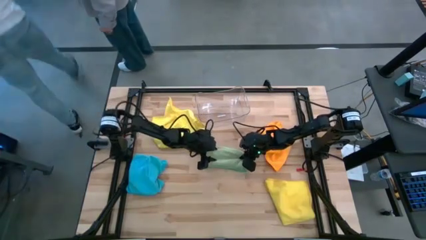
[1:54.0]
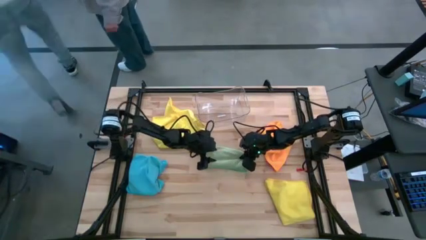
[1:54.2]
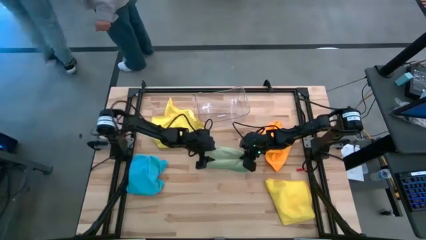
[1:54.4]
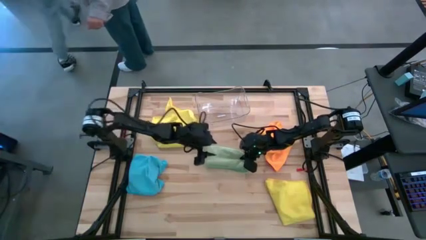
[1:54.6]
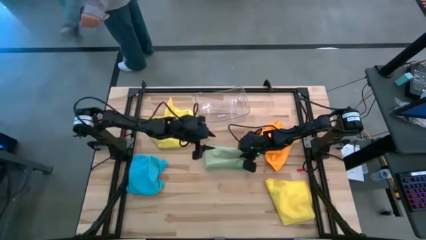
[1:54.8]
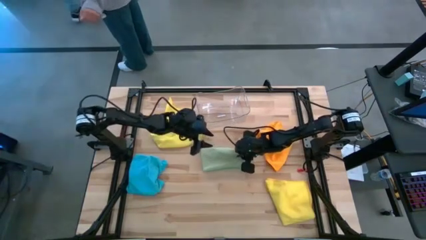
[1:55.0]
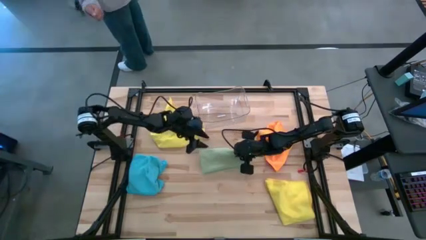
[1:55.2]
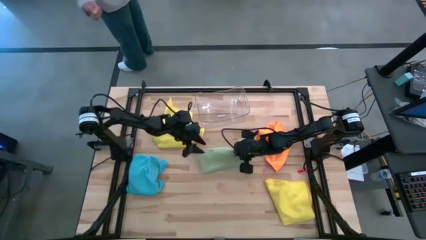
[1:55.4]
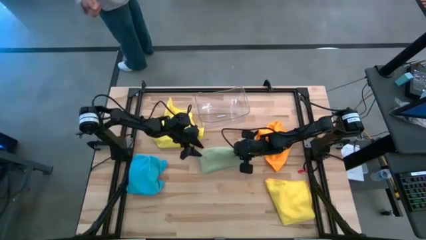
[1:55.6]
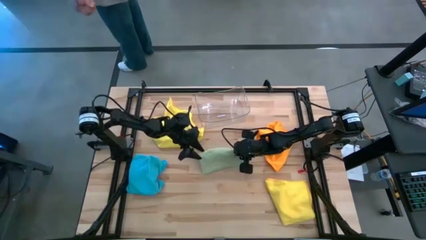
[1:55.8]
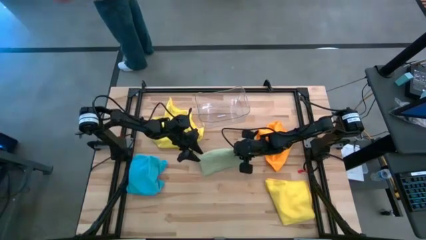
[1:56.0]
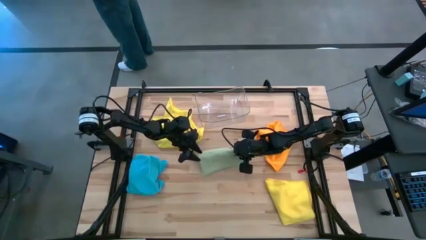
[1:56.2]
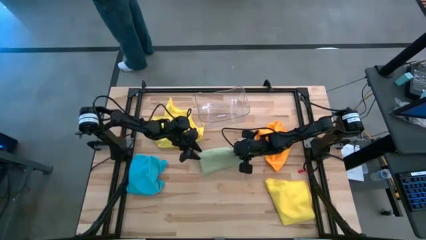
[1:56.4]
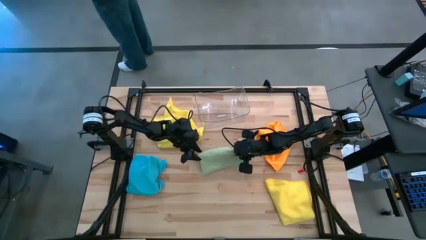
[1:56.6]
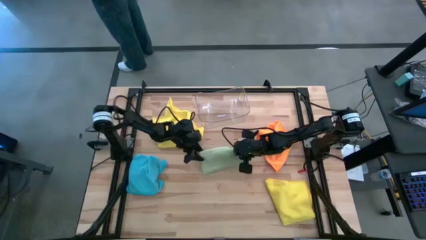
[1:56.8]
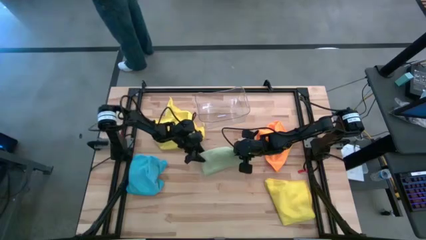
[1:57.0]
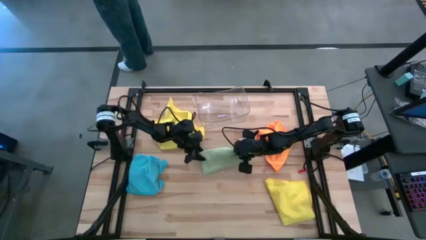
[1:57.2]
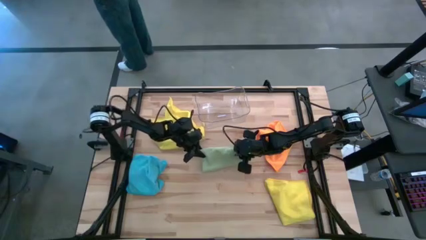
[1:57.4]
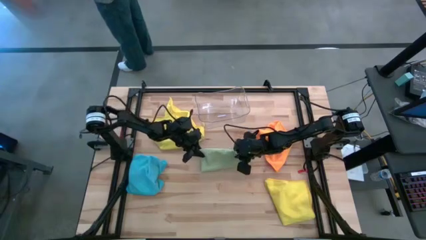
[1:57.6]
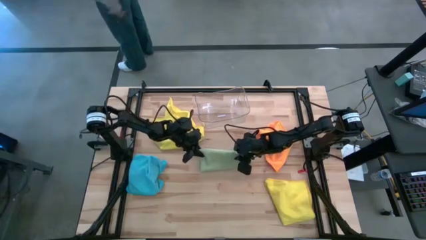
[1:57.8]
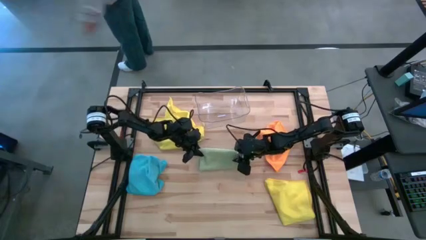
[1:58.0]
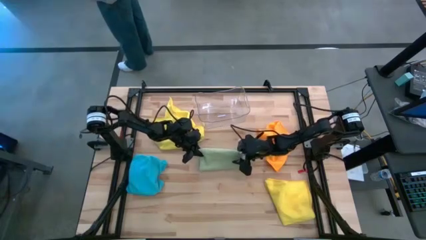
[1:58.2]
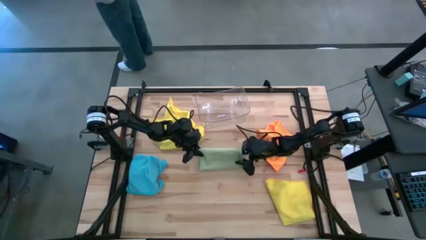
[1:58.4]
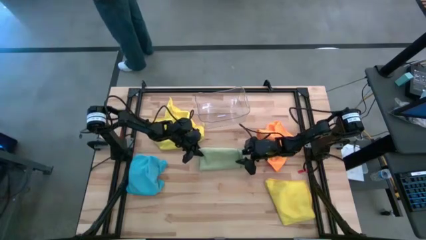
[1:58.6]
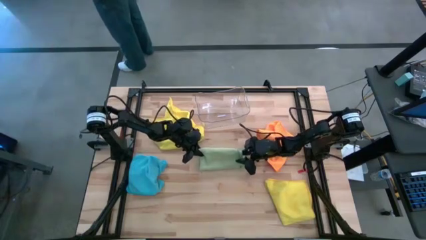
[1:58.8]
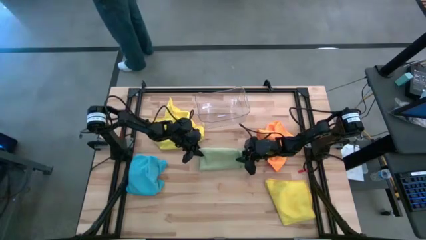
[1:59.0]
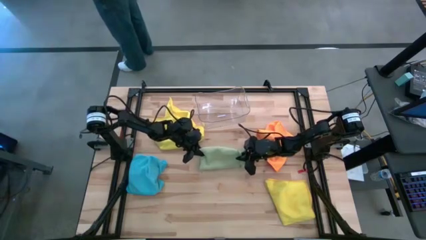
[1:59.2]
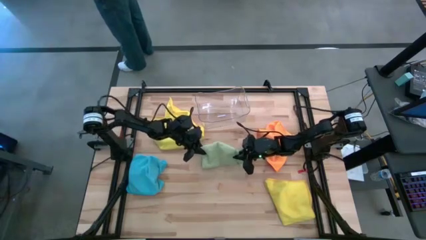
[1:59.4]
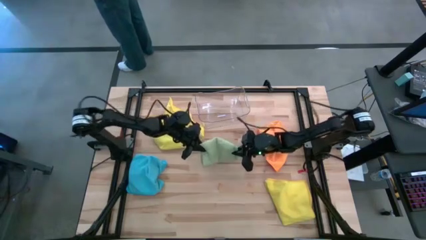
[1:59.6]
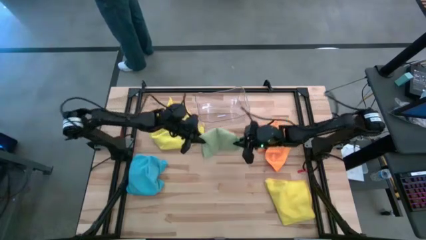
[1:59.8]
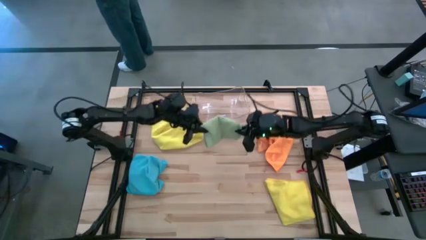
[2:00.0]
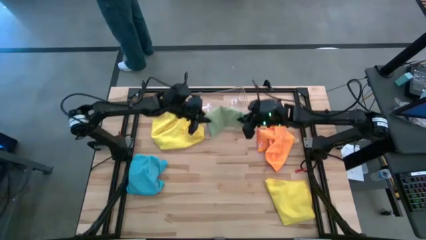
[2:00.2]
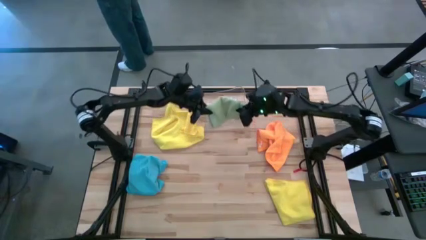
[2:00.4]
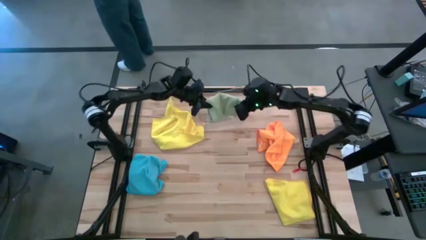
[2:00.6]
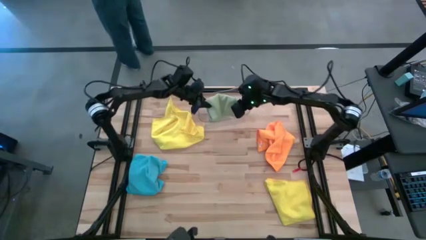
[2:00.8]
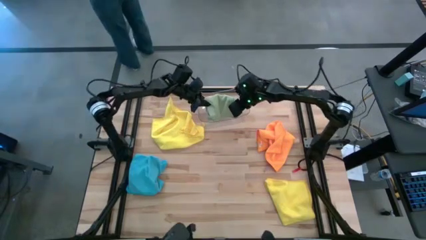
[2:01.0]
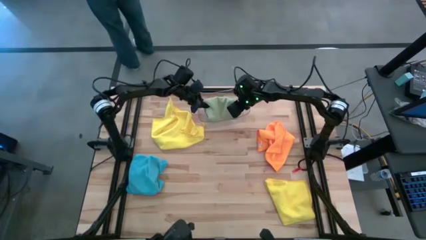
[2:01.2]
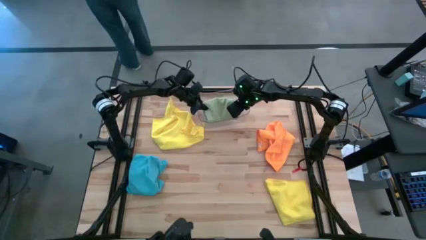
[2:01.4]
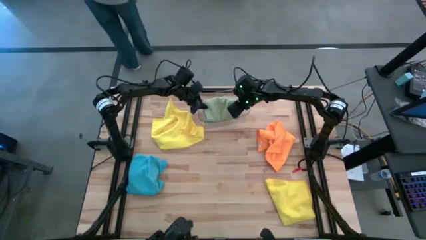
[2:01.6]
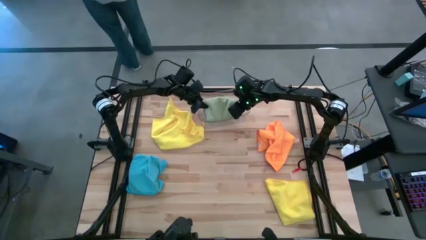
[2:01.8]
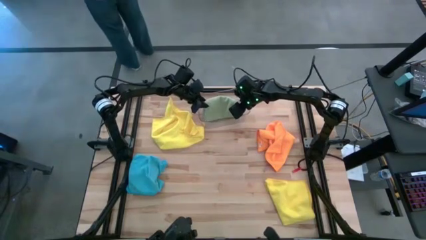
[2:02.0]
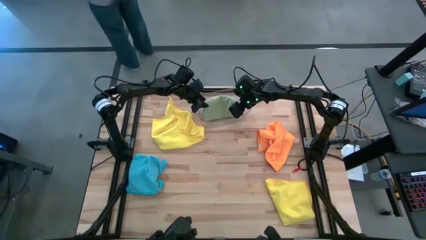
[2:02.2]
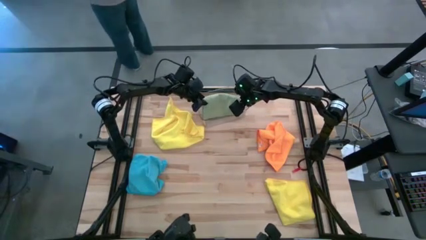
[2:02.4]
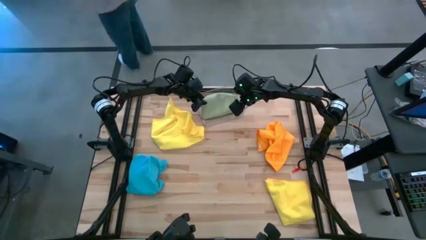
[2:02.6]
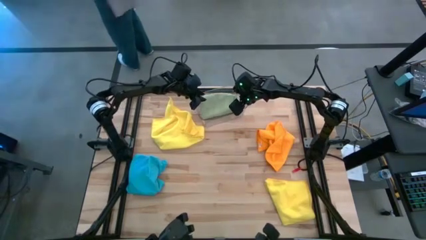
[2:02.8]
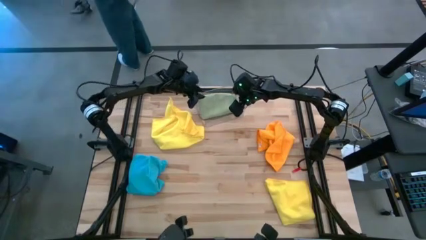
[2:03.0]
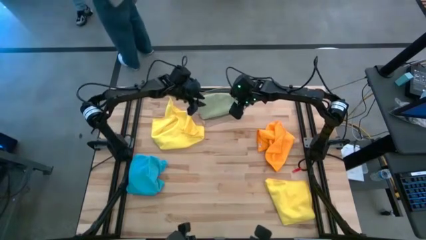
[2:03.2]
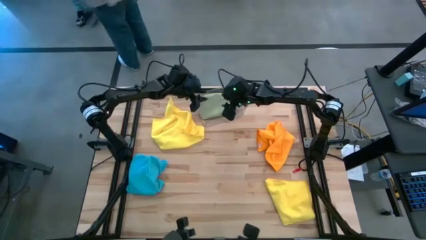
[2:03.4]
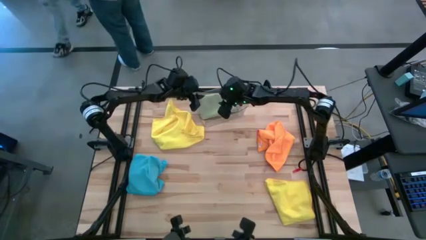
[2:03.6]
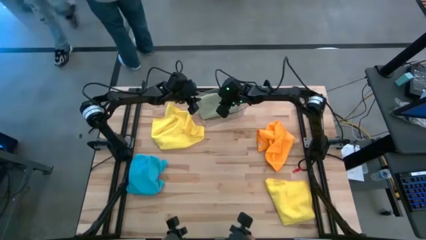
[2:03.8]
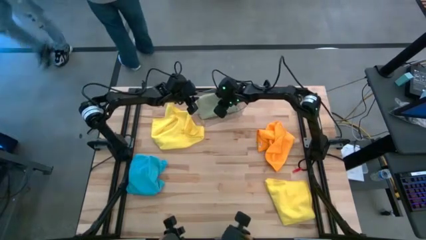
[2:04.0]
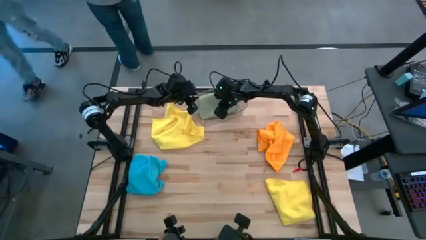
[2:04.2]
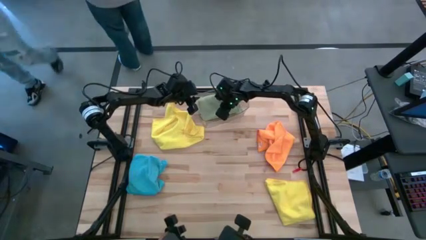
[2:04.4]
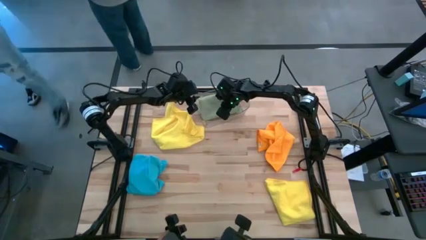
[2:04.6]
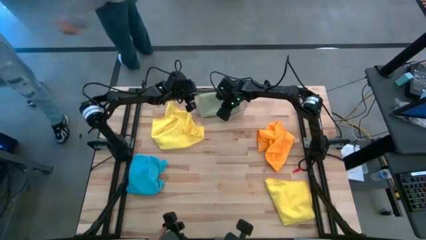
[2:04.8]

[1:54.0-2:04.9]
Task: Fold microfiber towels
Put the light green microfiber cloth into the transparent bin
